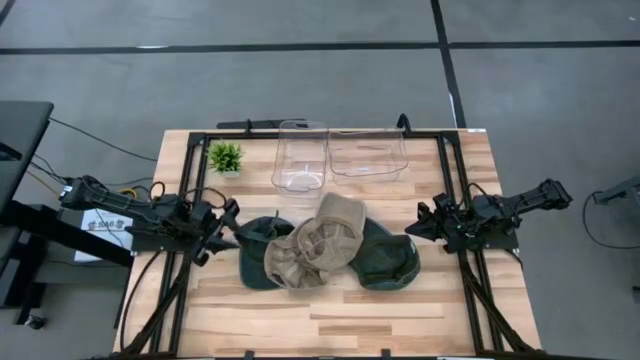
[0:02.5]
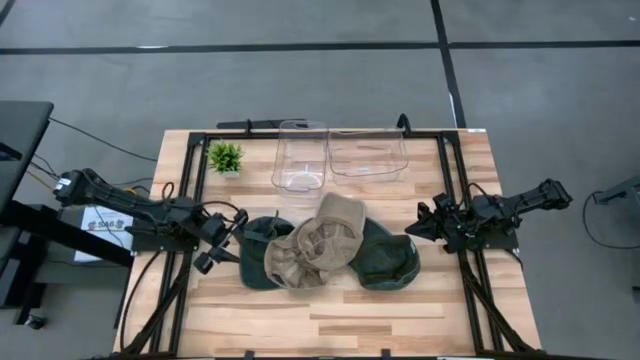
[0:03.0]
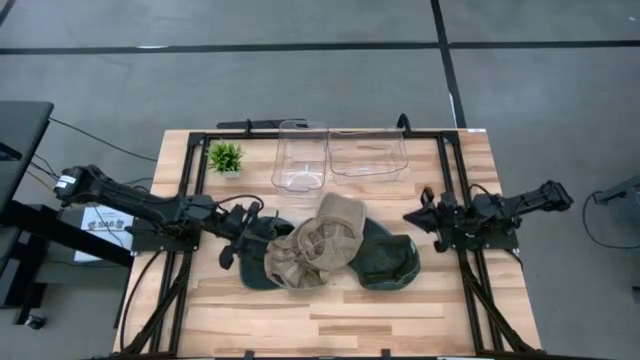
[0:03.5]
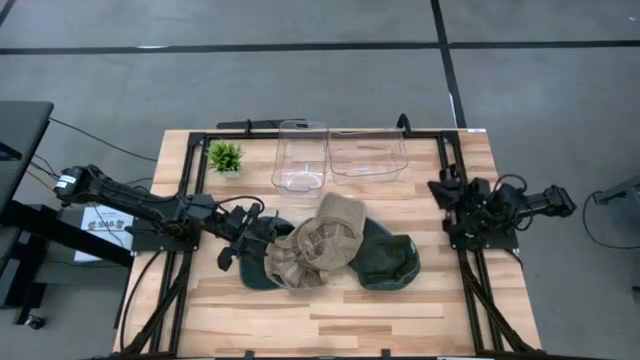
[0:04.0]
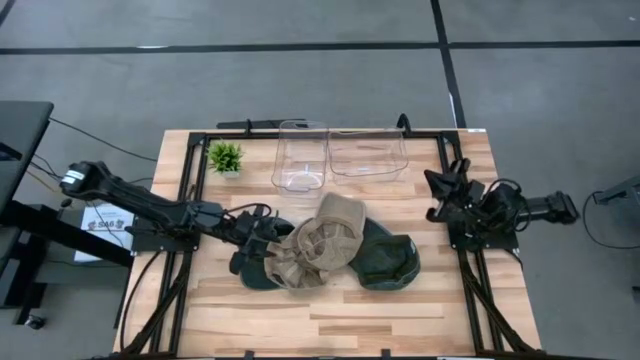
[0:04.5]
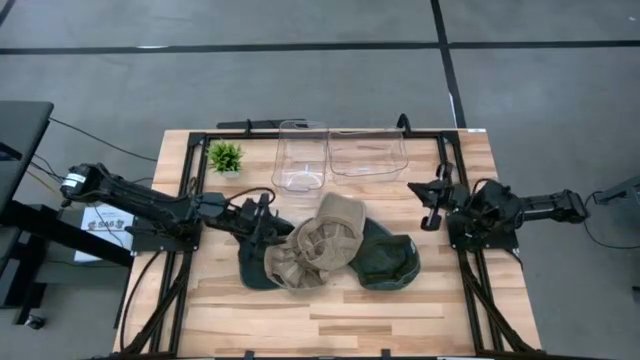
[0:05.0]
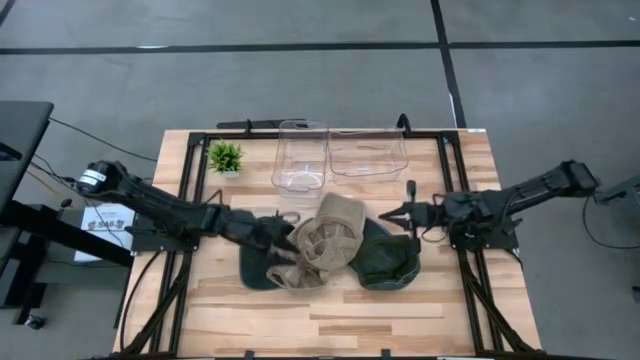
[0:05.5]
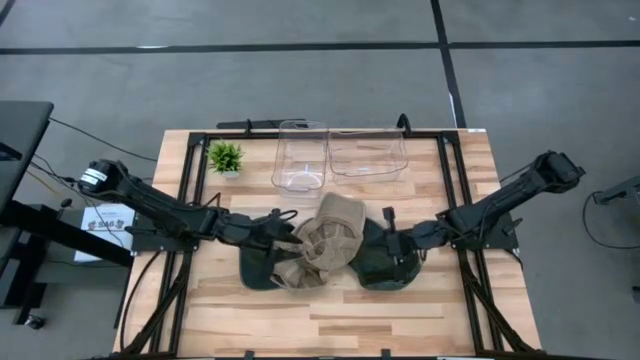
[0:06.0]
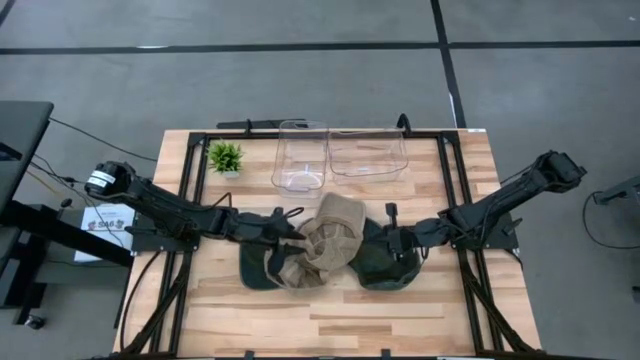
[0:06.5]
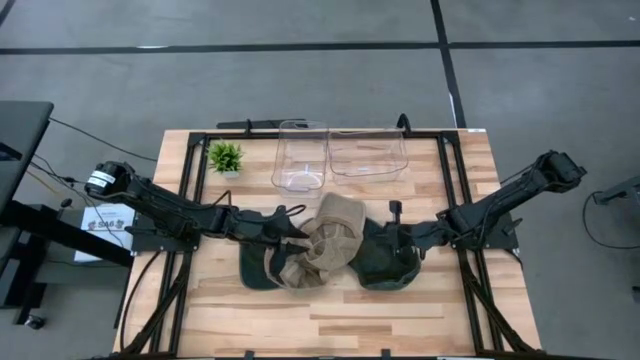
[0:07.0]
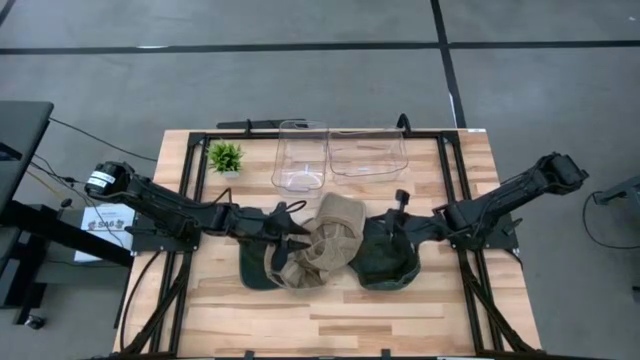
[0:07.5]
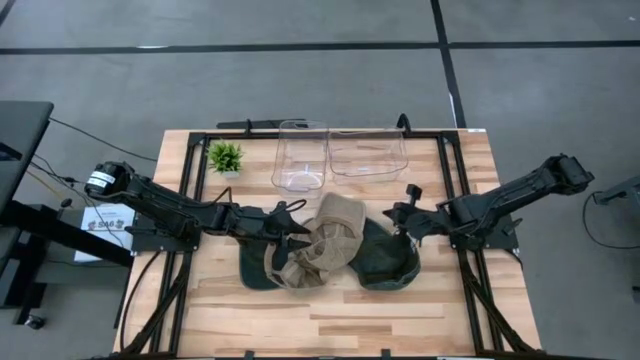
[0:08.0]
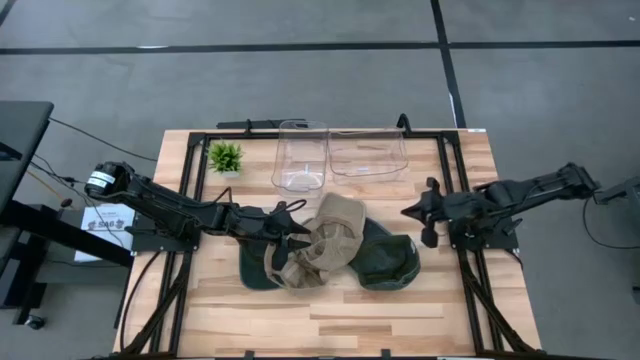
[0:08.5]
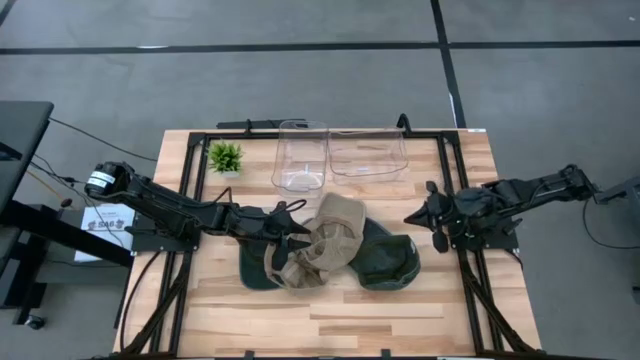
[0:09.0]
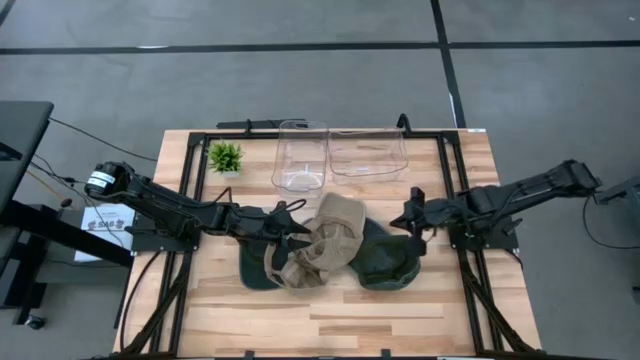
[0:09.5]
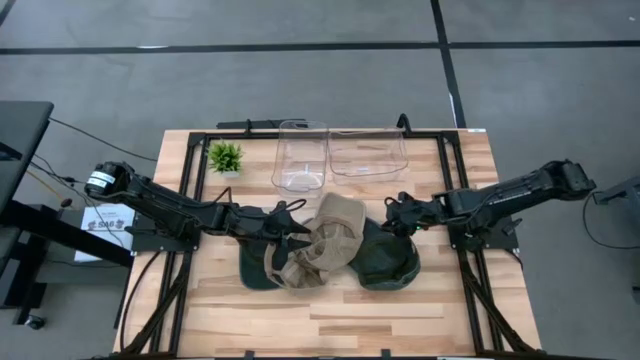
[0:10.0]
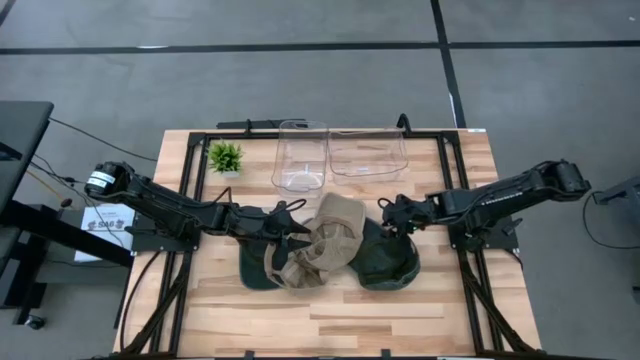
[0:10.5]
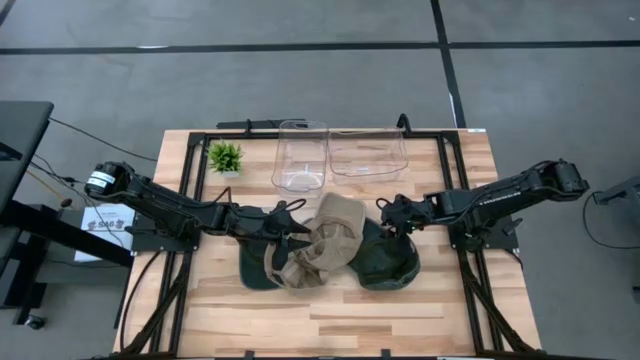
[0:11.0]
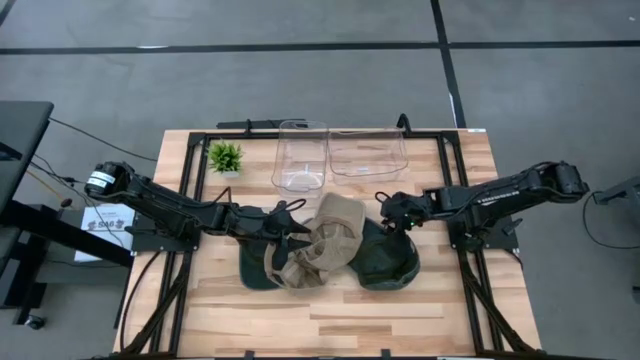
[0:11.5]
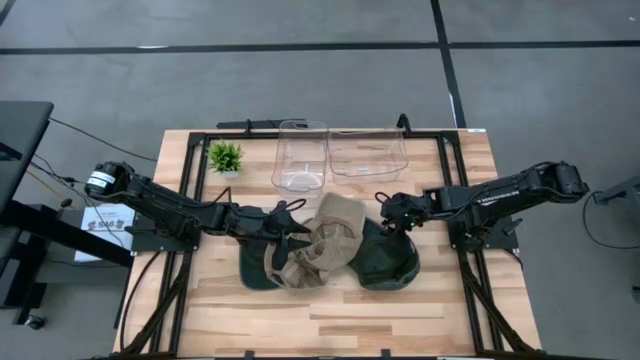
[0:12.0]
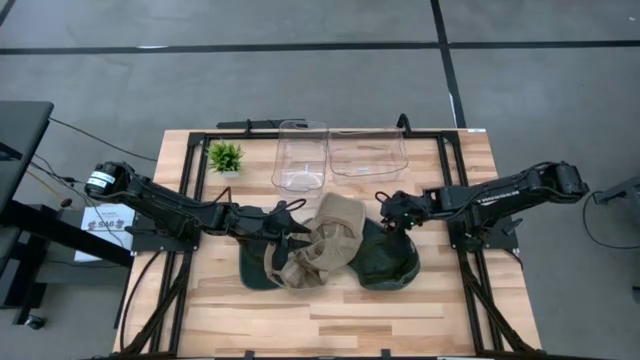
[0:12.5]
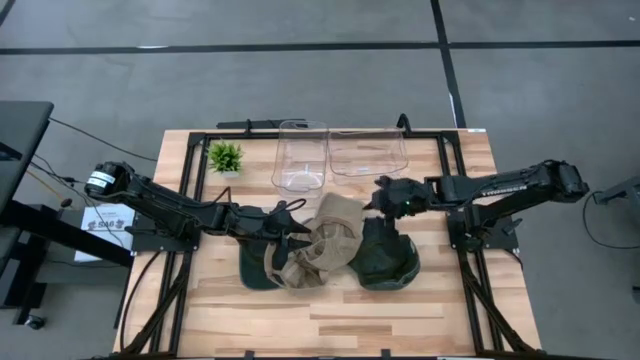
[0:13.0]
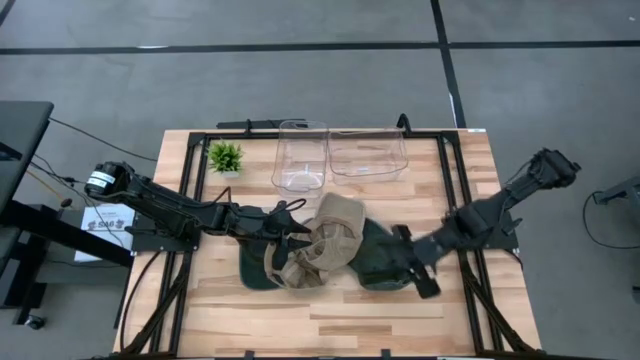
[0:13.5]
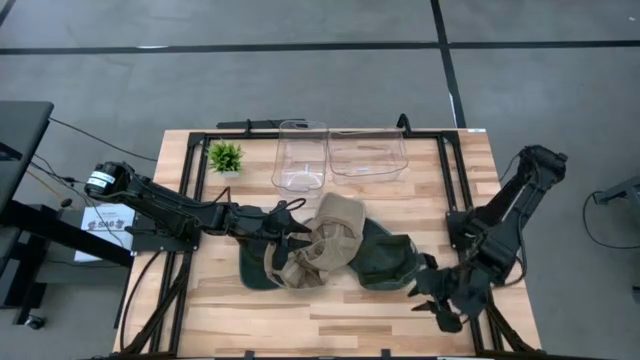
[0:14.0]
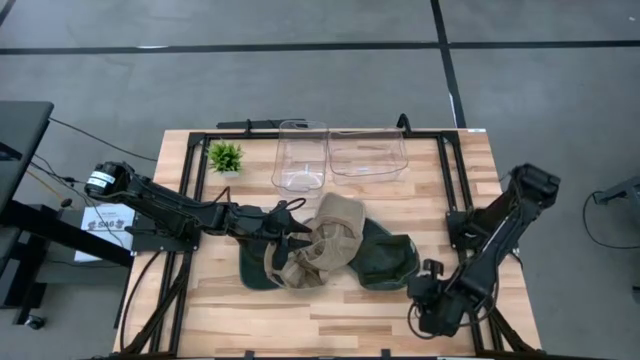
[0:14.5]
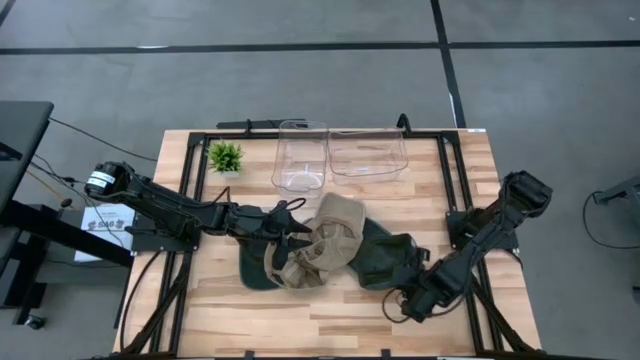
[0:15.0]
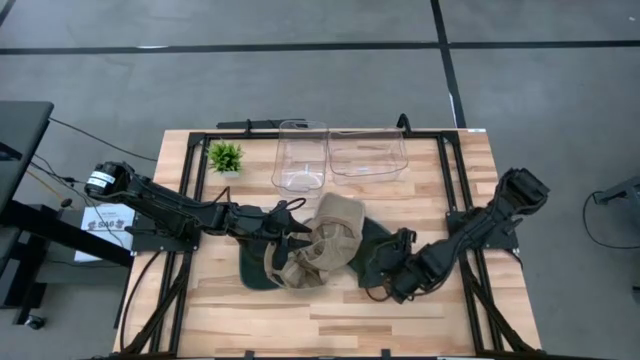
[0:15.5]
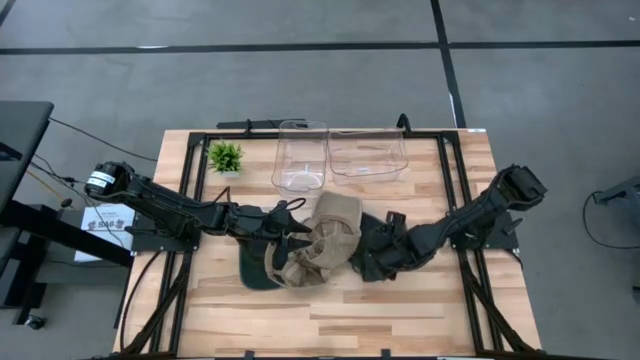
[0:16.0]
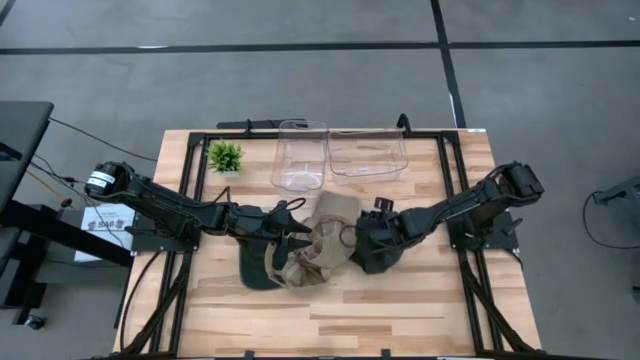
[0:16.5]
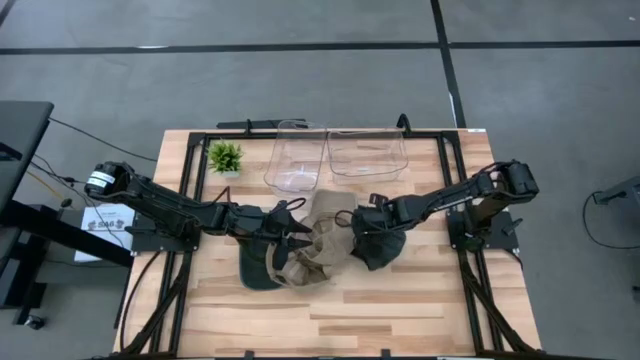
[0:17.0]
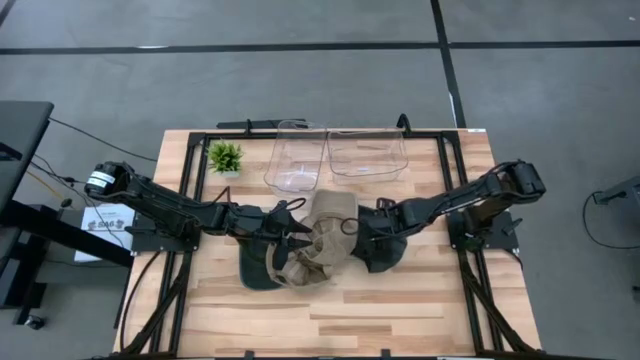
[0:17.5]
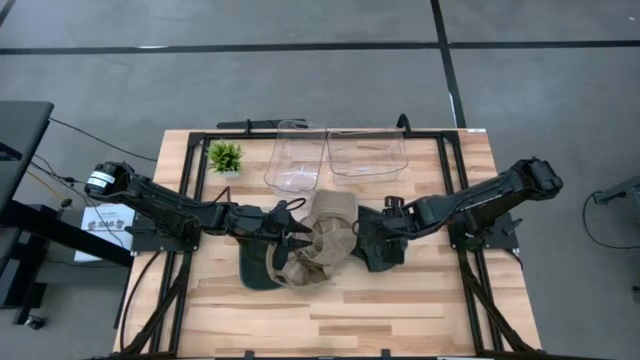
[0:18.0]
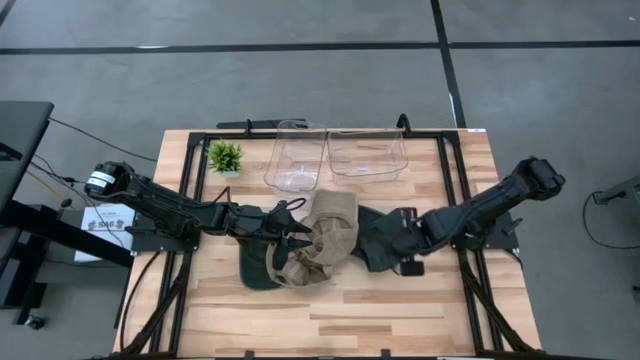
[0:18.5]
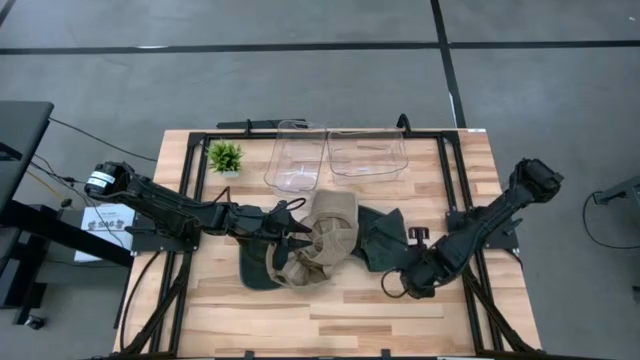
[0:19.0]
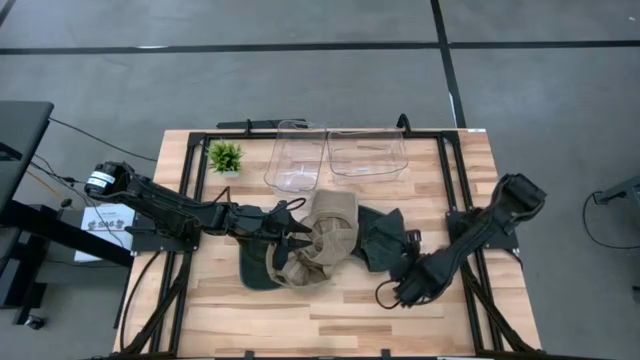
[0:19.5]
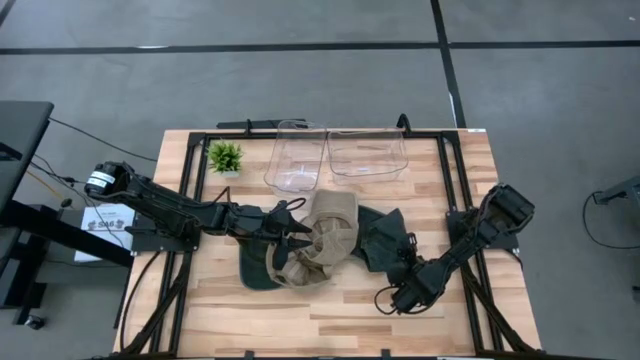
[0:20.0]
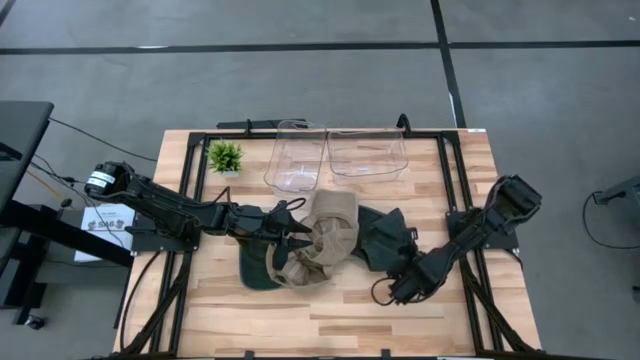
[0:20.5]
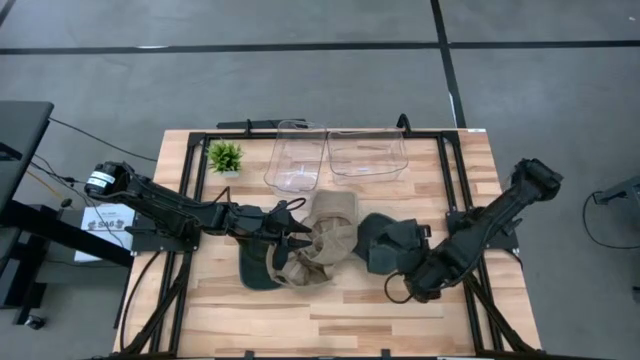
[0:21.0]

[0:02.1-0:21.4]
Task: Pick & Place hat
Put the right black cap into the right transparent bin
